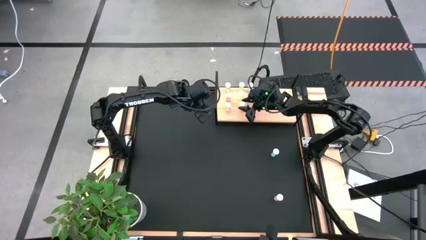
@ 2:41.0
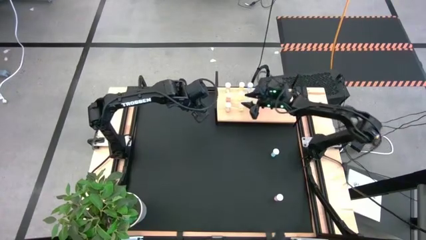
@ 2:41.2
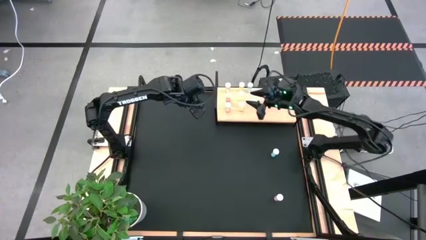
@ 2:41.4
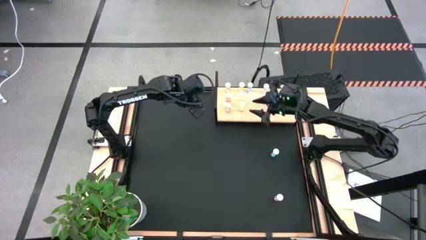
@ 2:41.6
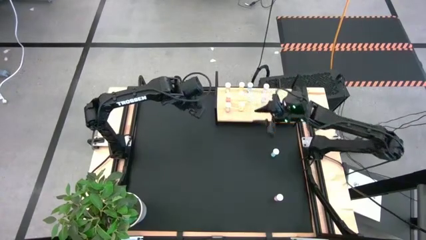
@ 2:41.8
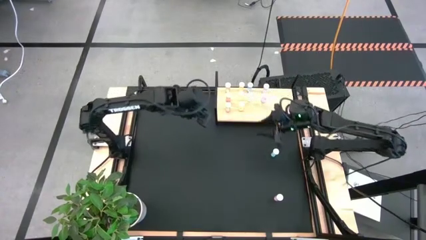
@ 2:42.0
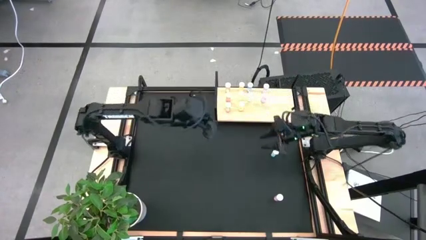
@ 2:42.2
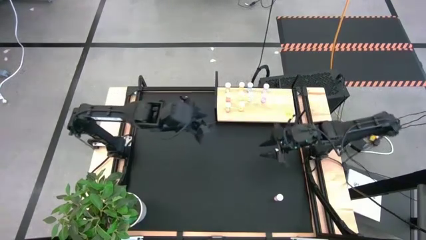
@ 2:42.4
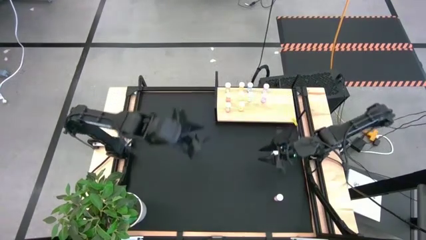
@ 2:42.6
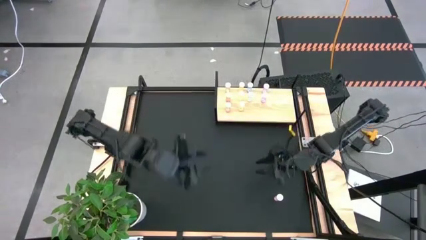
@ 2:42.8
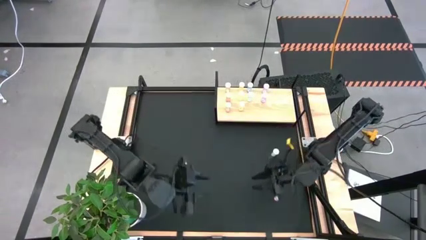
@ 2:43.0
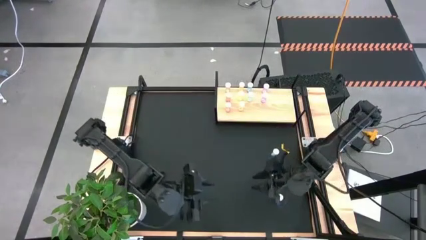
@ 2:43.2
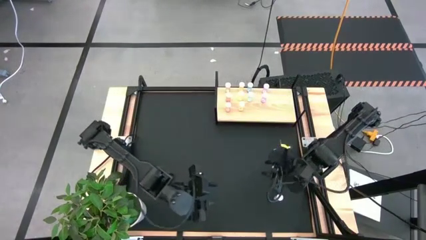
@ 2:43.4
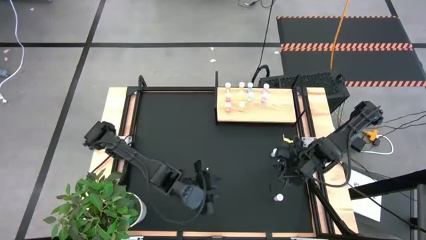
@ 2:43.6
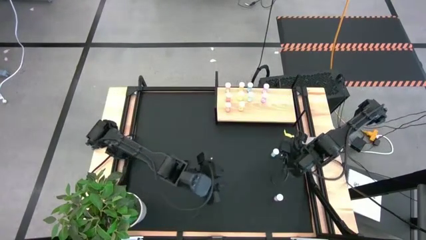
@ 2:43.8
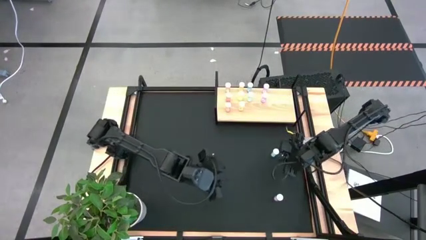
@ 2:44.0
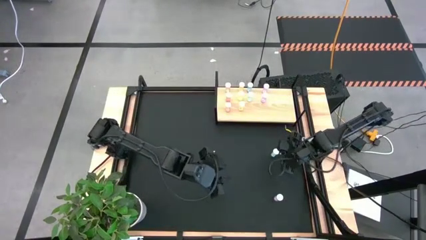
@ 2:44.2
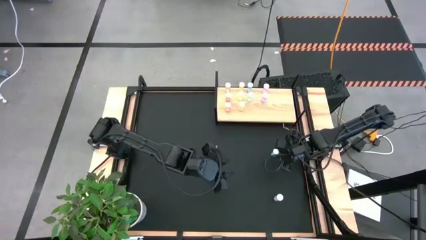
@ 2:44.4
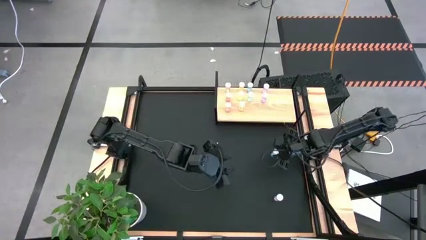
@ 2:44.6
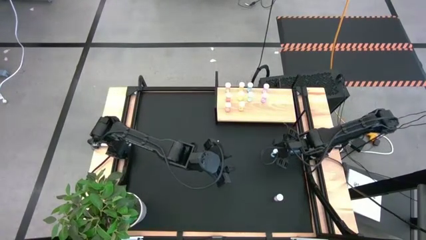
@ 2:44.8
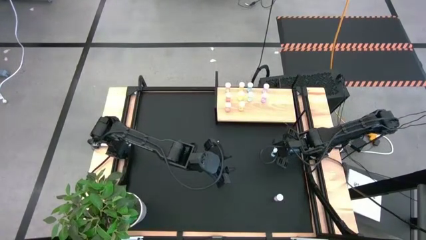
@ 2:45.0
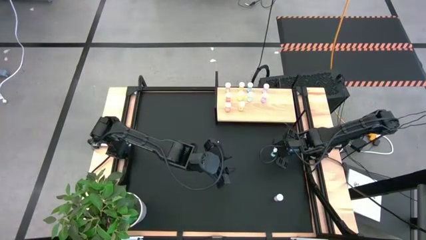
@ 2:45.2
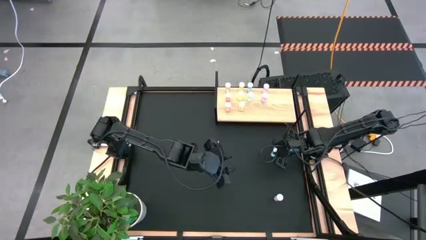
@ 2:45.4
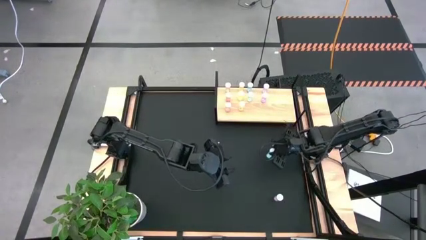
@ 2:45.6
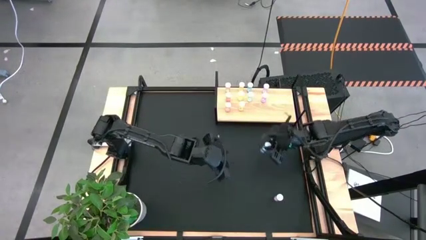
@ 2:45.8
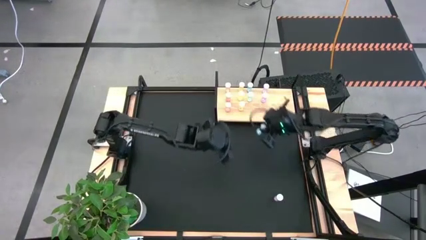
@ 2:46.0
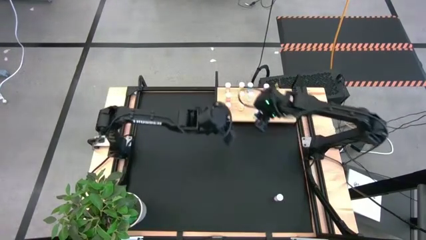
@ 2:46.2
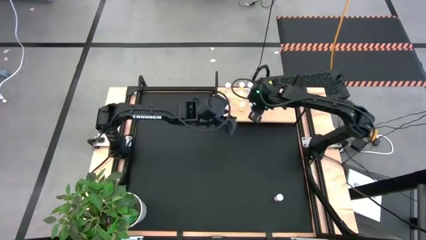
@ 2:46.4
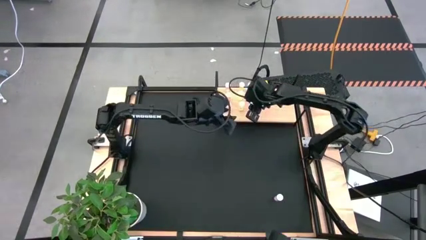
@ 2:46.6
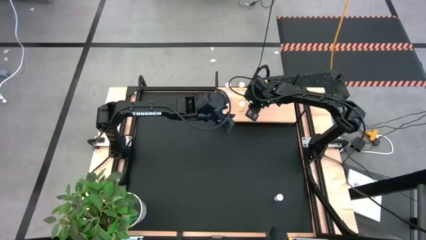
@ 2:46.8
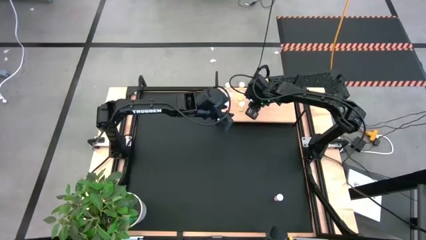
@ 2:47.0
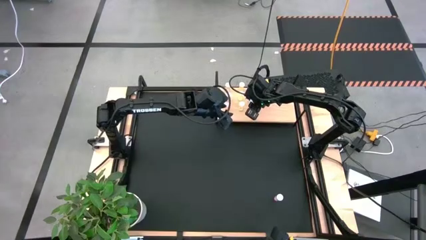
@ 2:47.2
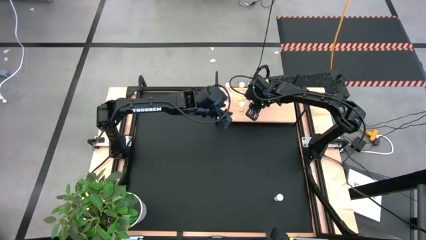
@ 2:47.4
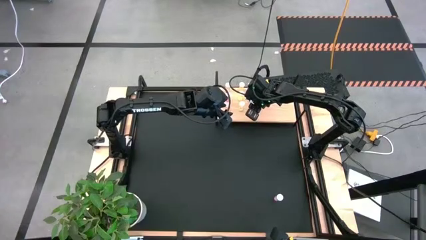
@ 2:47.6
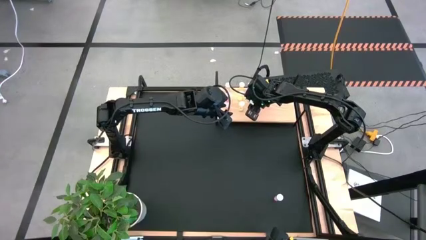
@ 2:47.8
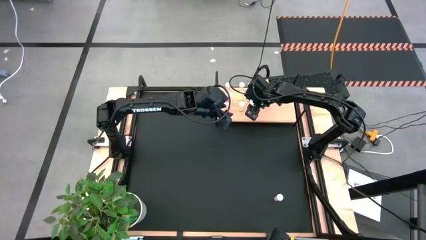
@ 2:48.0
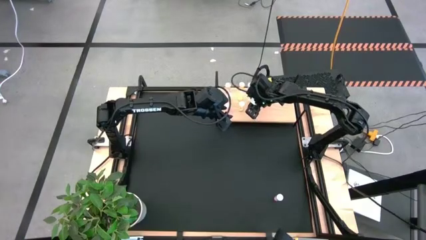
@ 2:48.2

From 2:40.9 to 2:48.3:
Task: Pick and place medicine bottles onto shelf by color
Put the blue pill bottle aligned with the other blue pill bottles on the shelf

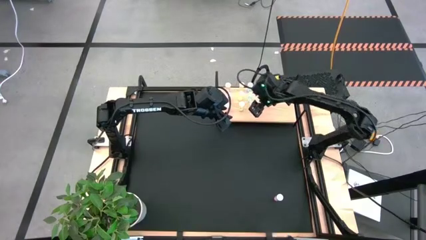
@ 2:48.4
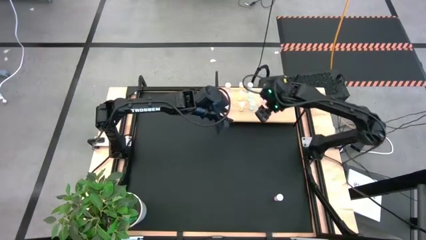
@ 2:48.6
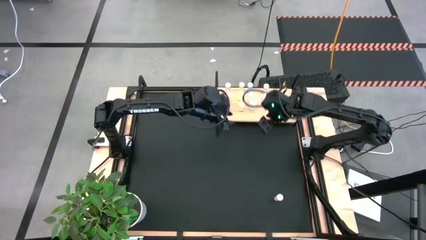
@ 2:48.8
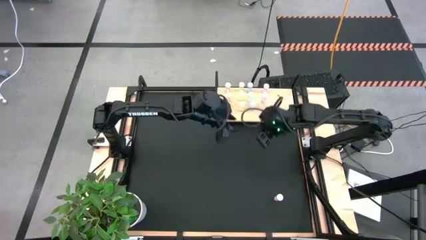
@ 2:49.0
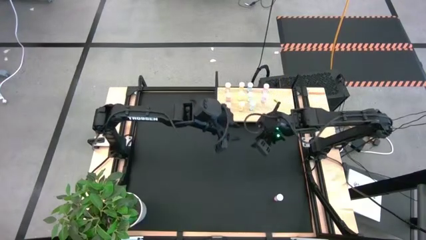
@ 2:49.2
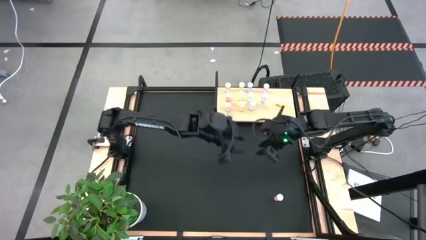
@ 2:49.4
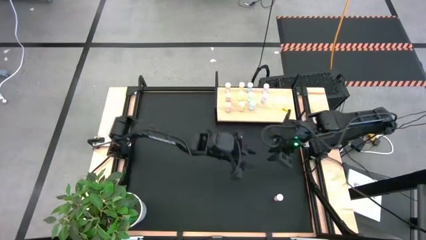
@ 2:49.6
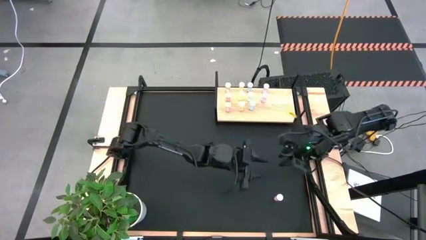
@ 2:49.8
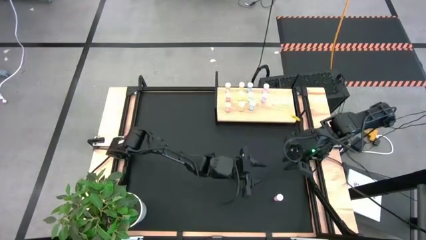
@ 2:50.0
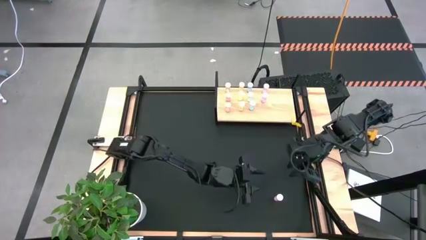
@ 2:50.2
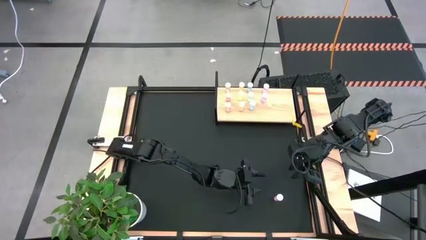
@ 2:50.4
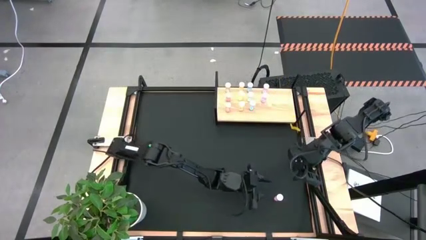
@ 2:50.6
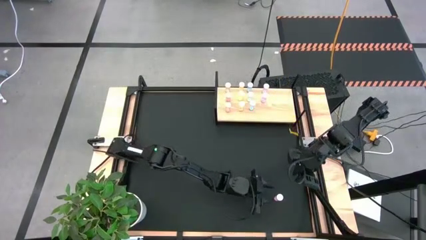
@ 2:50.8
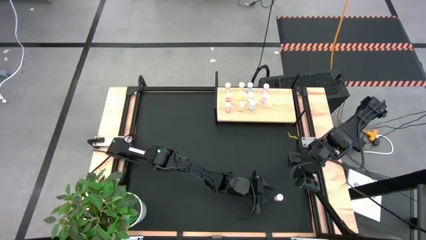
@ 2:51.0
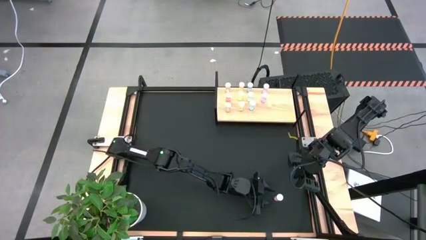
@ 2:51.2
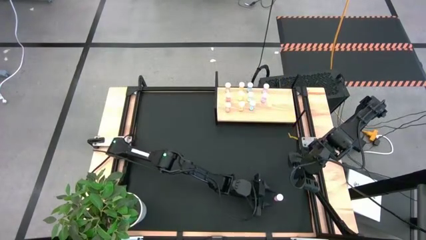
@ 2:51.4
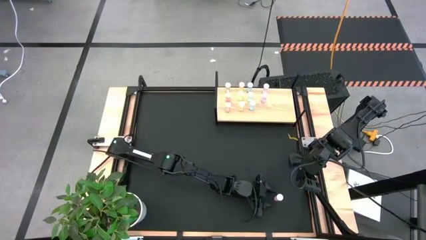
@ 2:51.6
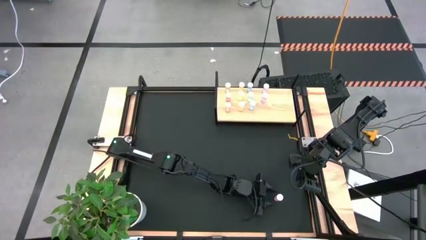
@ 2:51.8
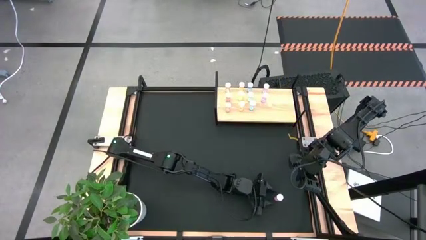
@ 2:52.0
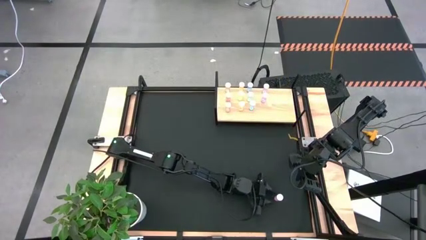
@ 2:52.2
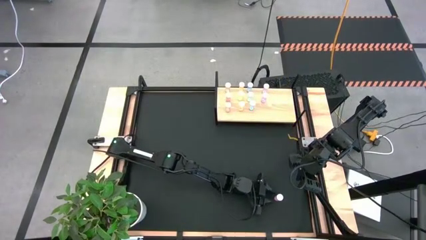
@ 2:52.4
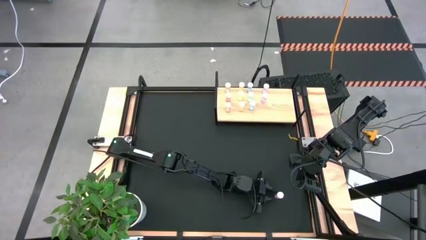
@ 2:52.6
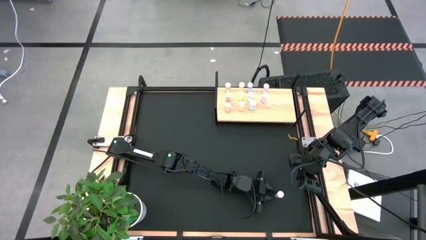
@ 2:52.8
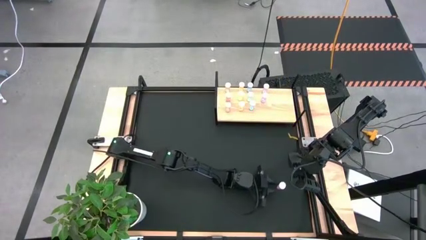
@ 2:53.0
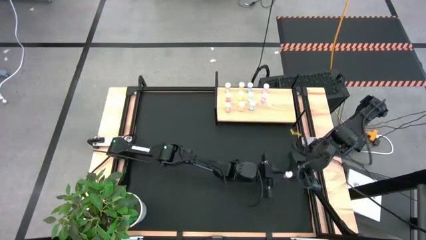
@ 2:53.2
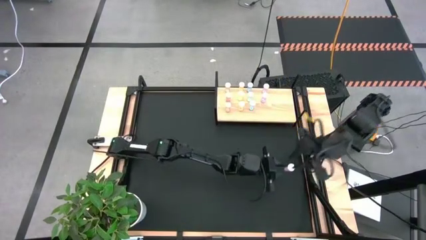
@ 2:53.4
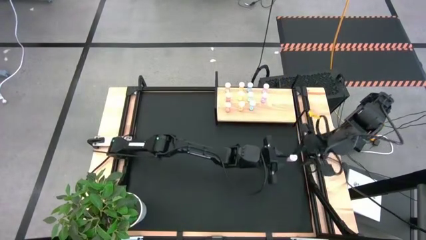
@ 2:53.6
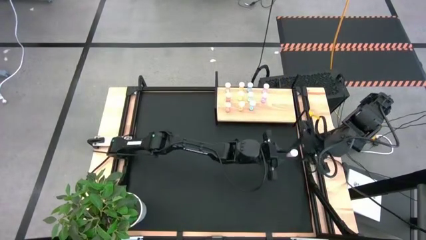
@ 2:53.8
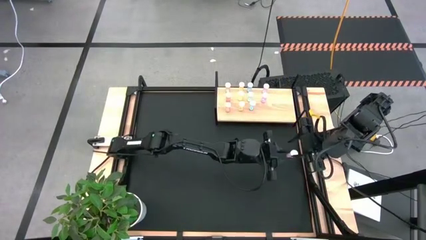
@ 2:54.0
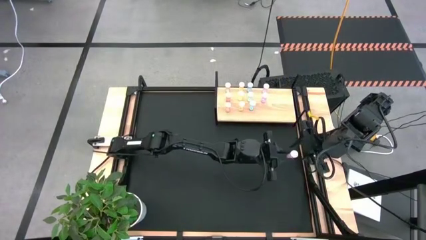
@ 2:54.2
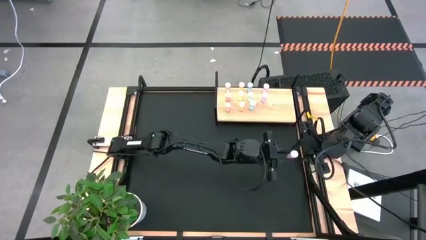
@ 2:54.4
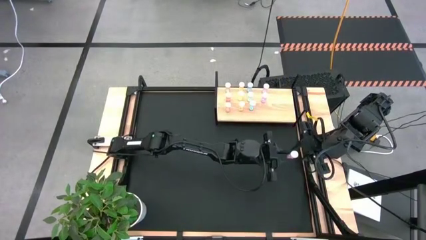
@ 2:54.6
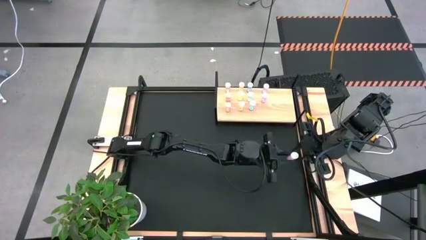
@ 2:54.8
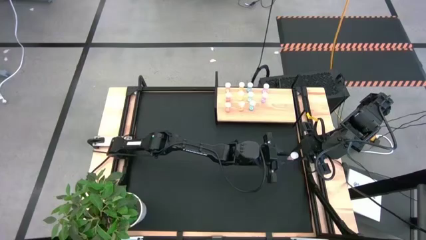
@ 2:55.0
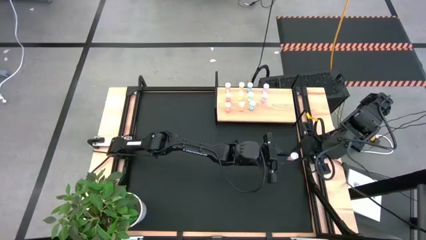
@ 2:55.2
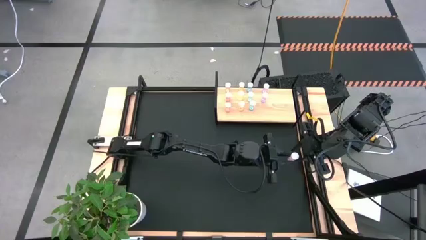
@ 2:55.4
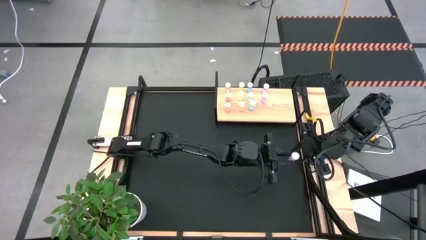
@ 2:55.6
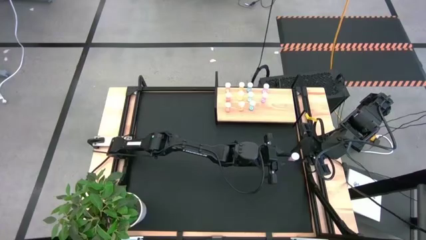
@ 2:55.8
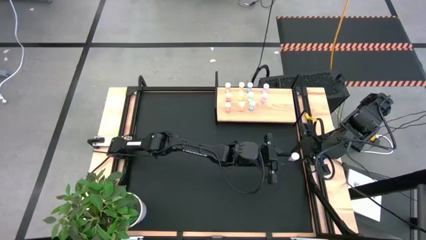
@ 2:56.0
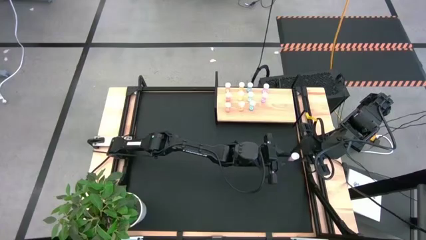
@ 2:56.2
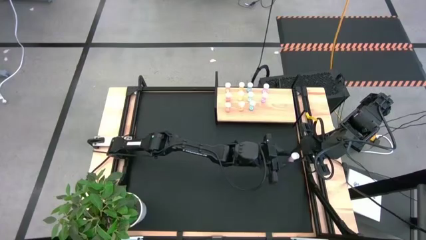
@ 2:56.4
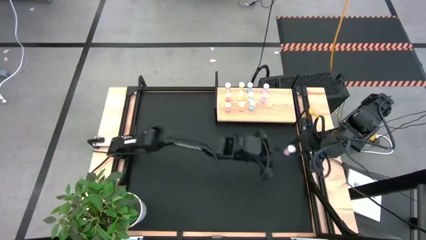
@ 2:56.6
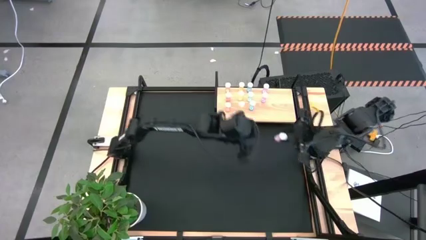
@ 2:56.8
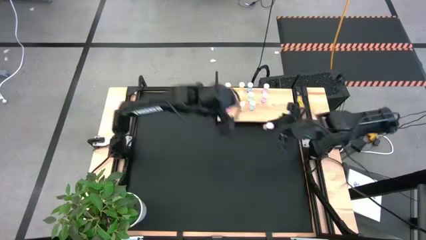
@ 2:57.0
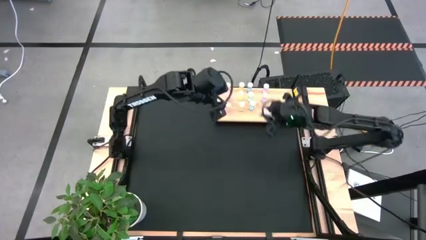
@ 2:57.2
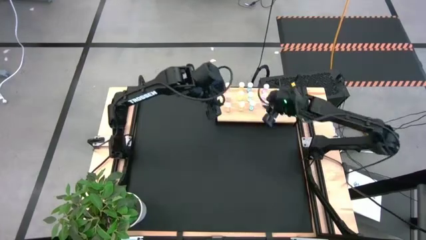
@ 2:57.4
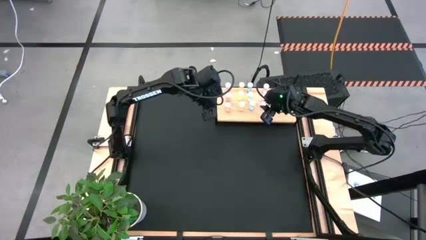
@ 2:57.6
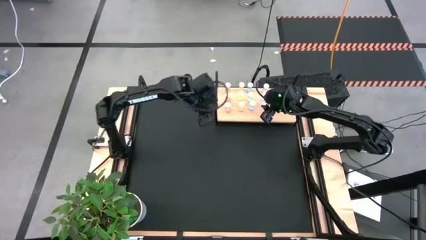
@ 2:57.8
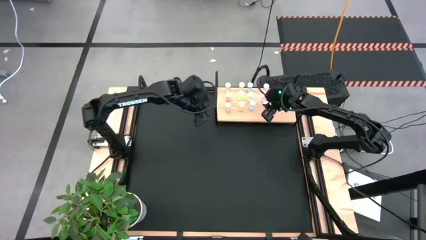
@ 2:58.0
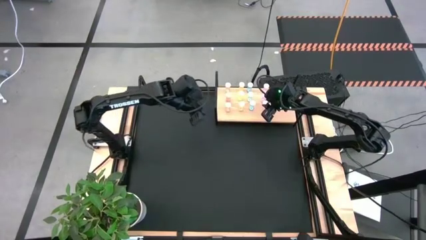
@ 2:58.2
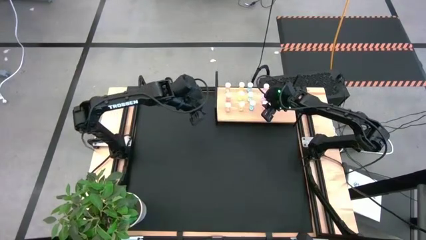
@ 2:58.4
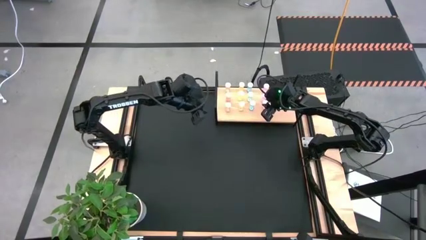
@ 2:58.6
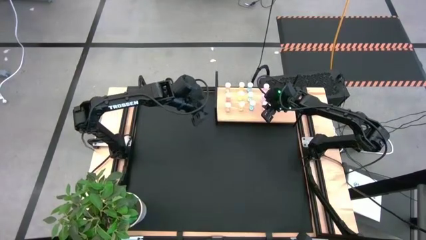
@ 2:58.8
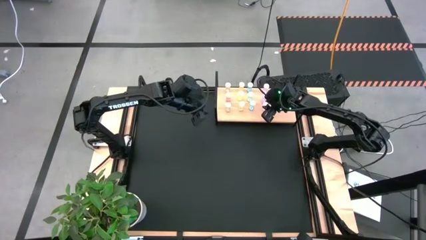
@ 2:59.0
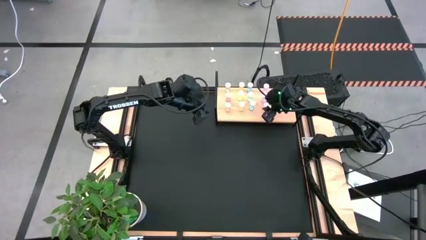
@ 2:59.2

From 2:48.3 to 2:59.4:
Put the purple pill bottle aligned with the other purple pill bottles on the shelf
